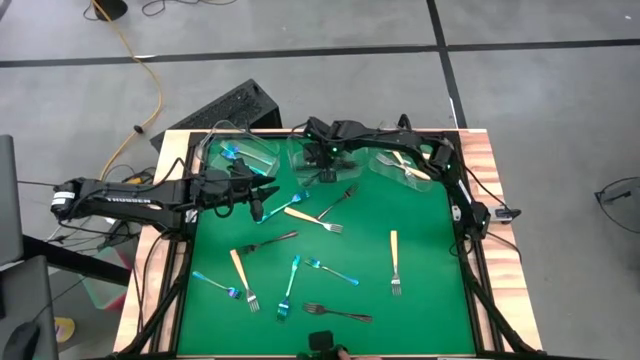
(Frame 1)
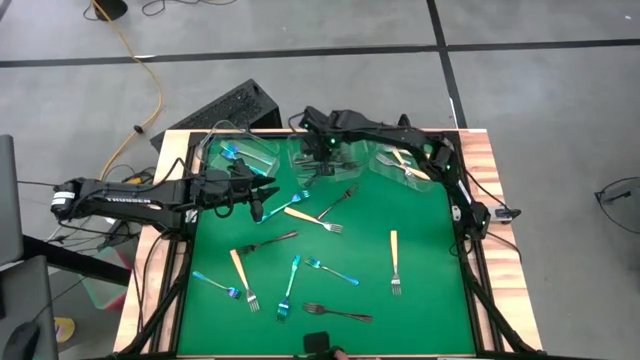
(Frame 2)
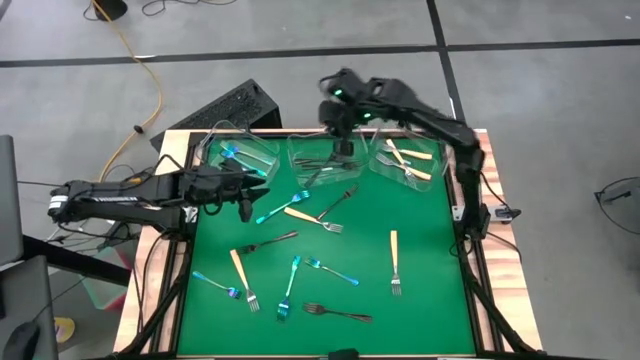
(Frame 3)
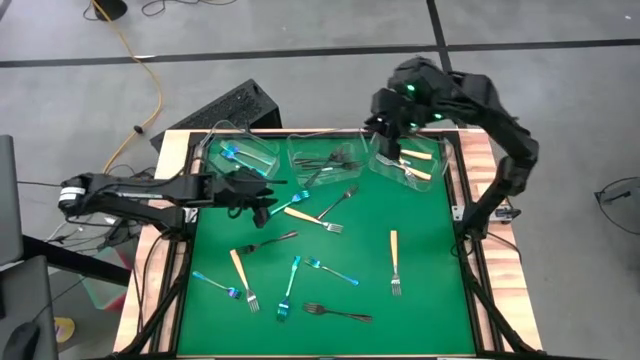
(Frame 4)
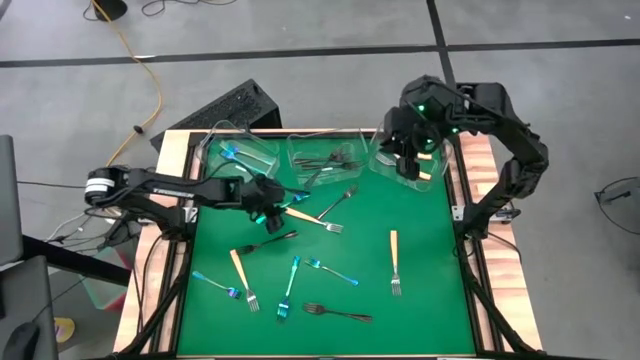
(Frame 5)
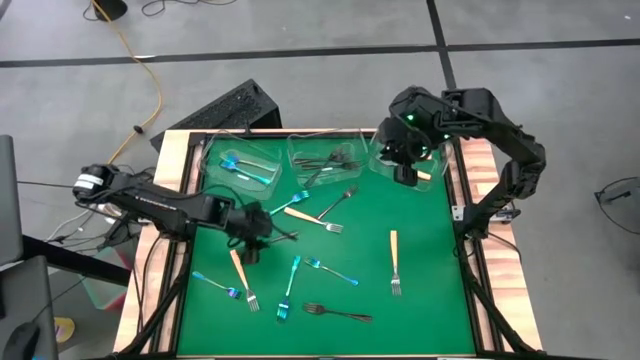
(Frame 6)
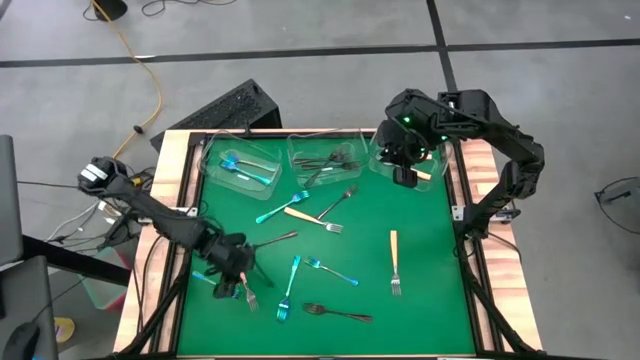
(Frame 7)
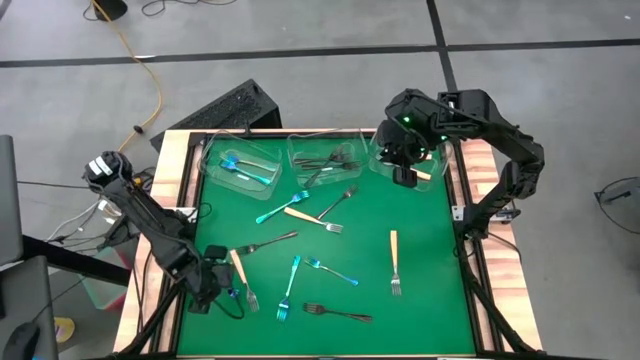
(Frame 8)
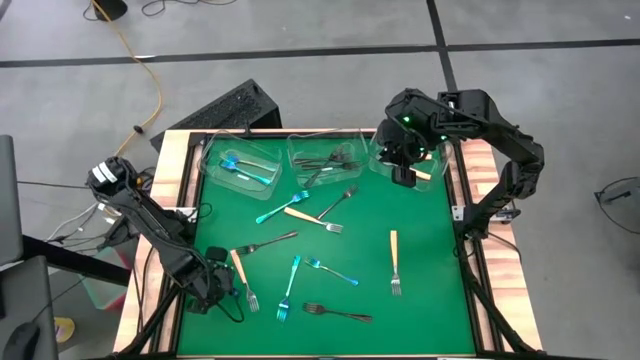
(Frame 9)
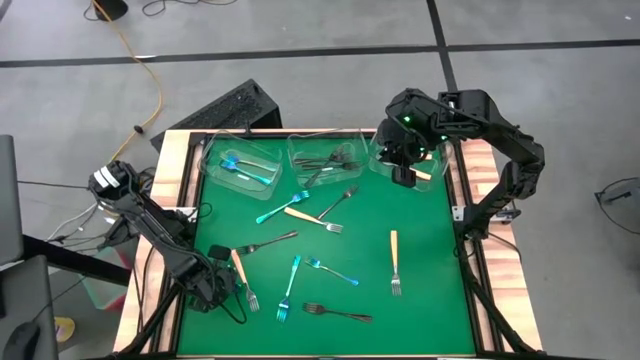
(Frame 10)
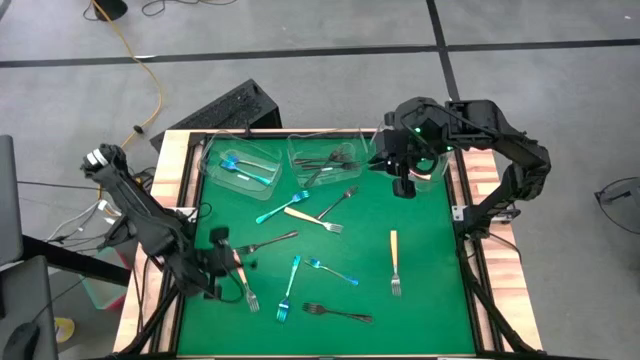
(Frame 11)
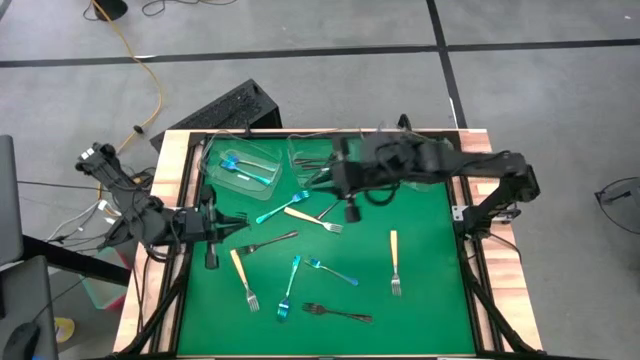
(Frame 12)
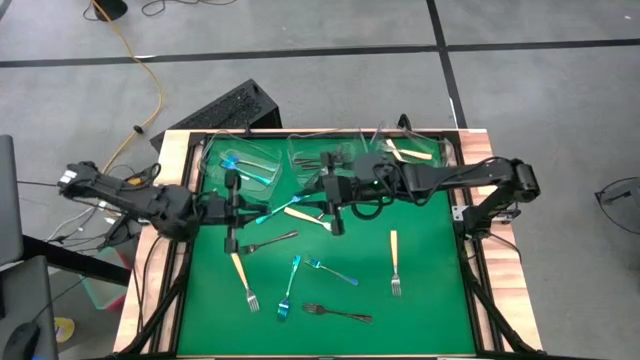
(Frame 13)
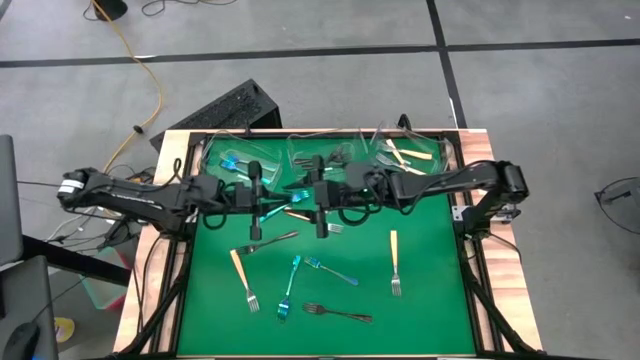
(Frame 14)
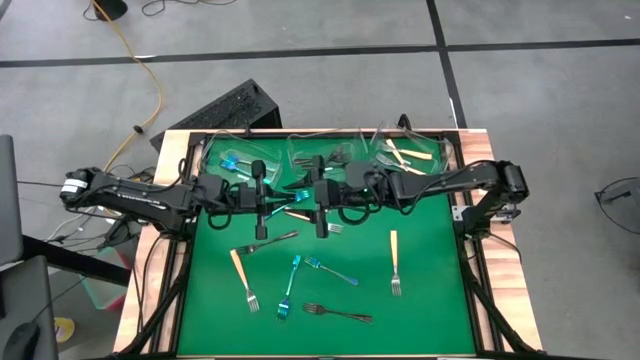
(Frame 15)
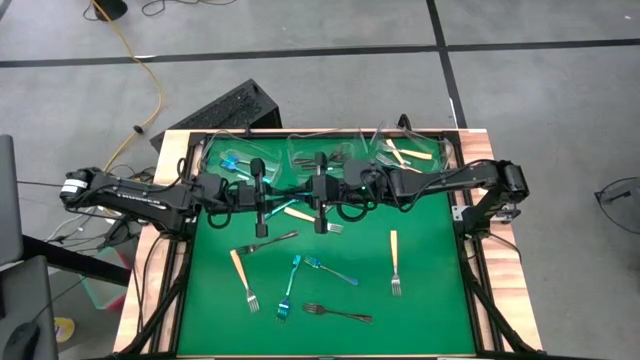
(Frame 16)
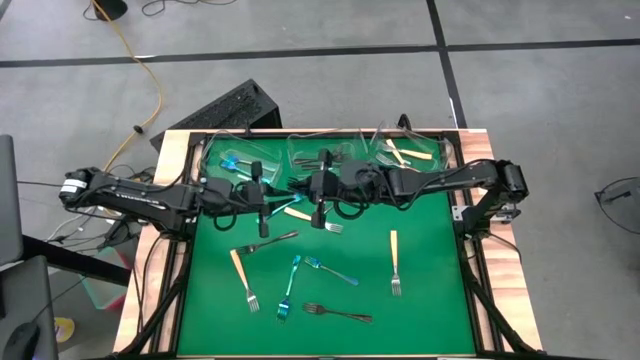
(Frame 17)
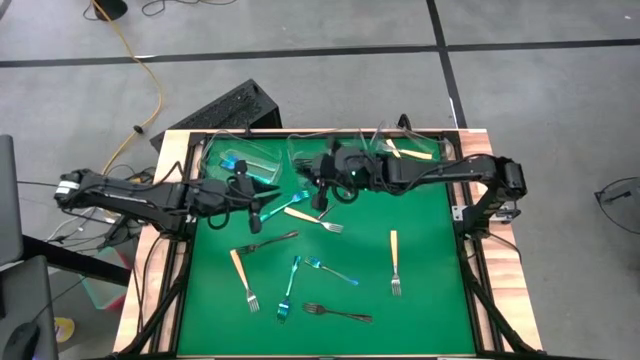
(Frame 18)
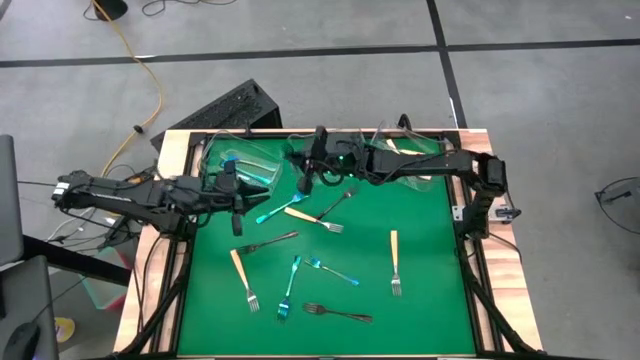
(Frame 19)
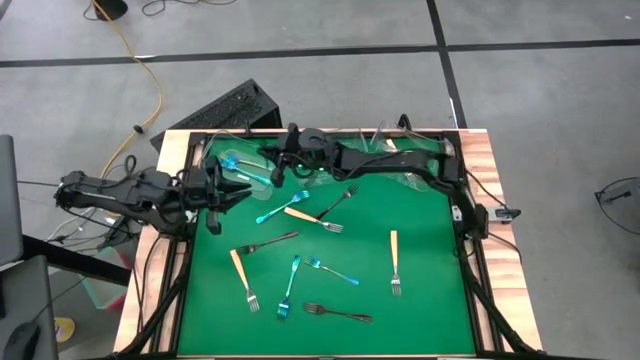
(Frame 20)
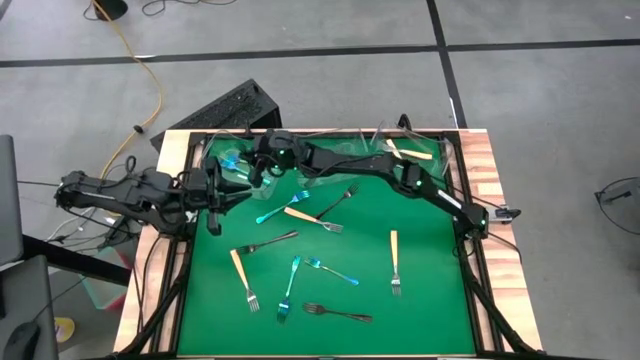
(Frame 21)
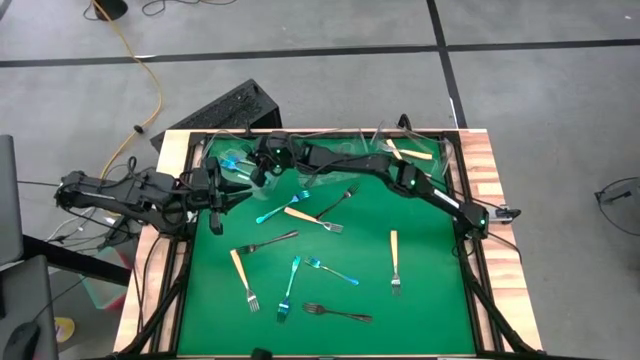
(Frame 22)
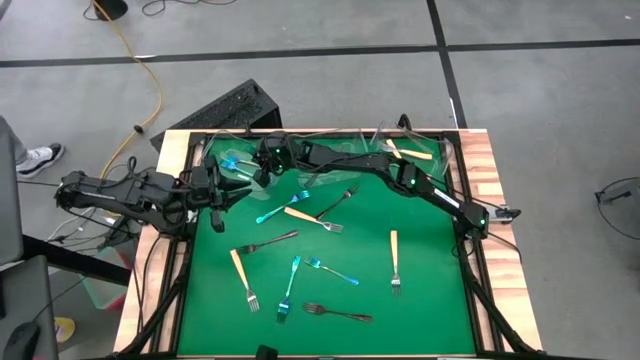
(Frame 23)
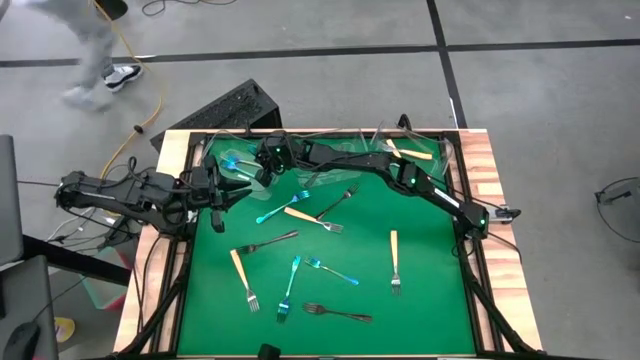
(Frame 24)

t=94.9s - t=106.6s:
Task: Sort silverware by color (type)
Put the blue fork into the left transparent bin

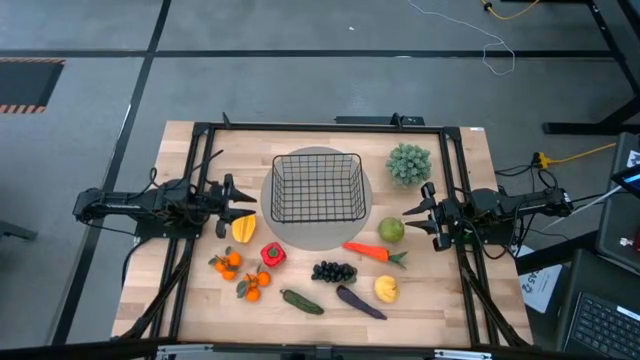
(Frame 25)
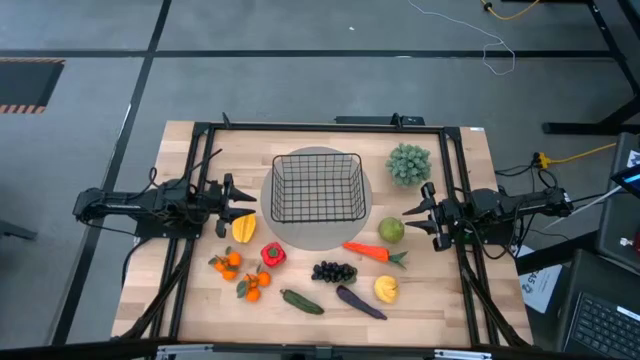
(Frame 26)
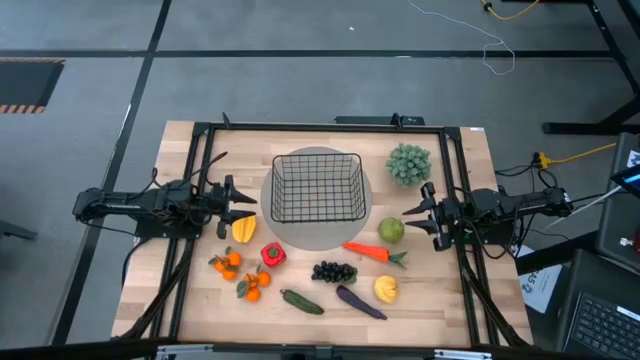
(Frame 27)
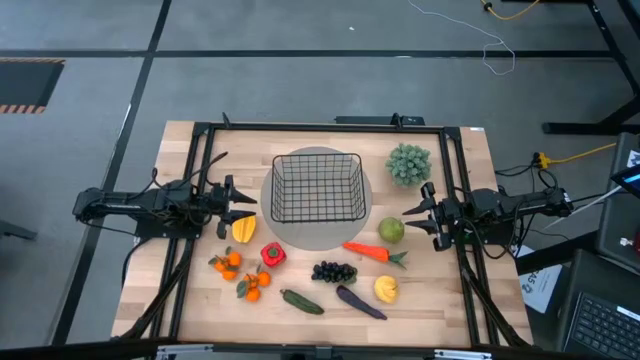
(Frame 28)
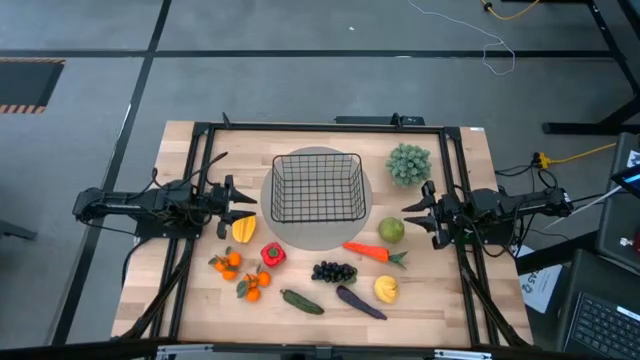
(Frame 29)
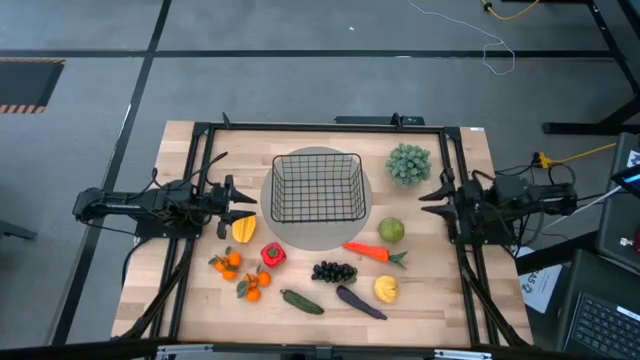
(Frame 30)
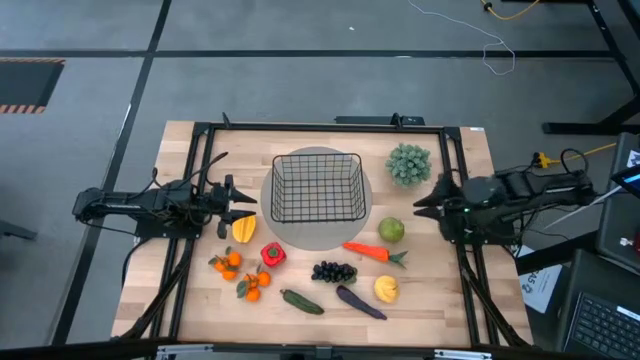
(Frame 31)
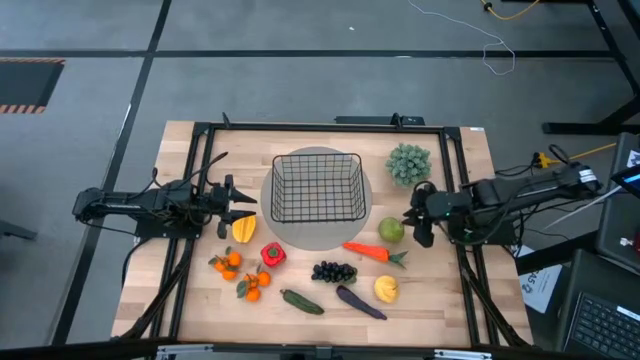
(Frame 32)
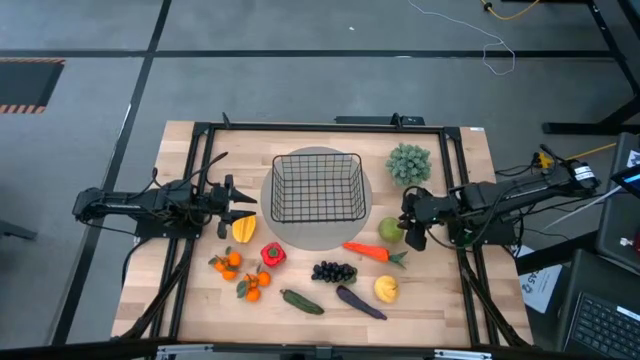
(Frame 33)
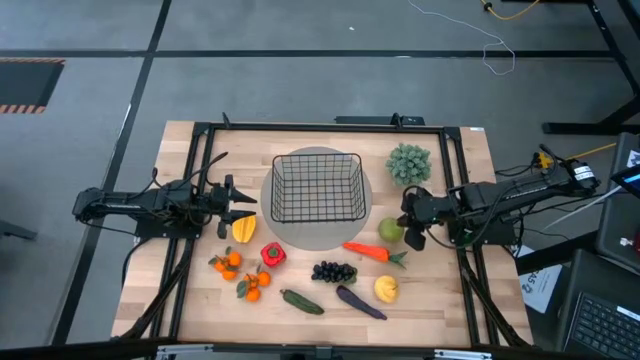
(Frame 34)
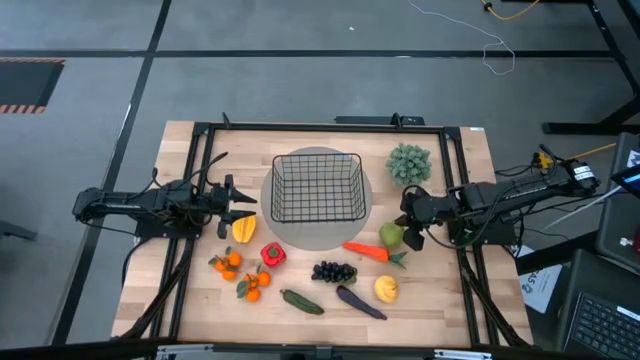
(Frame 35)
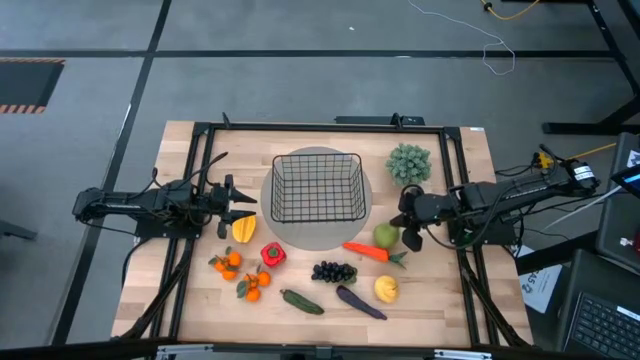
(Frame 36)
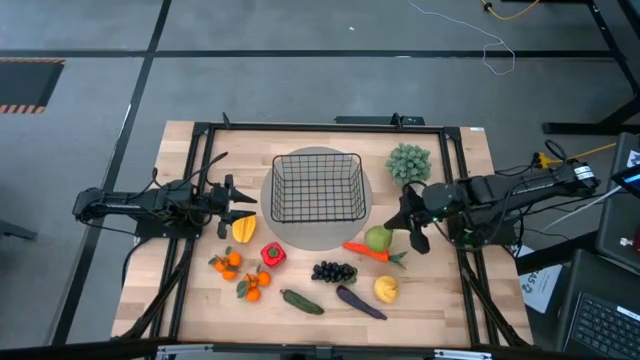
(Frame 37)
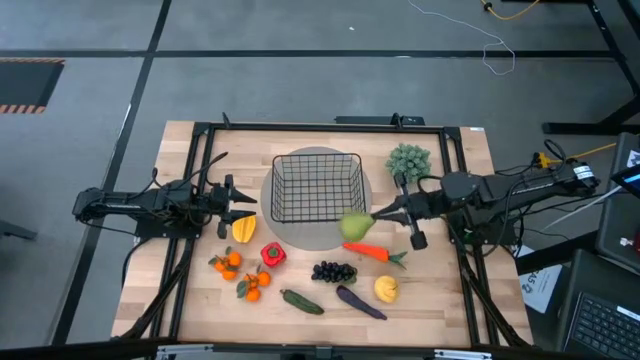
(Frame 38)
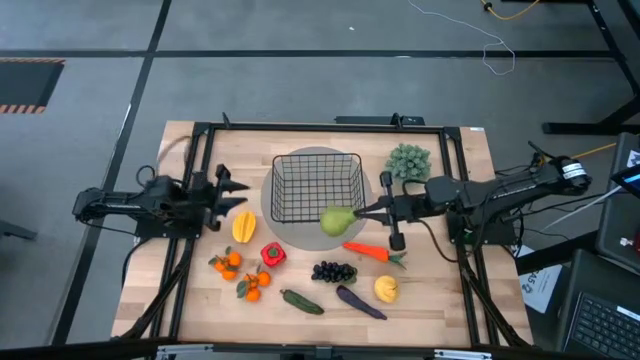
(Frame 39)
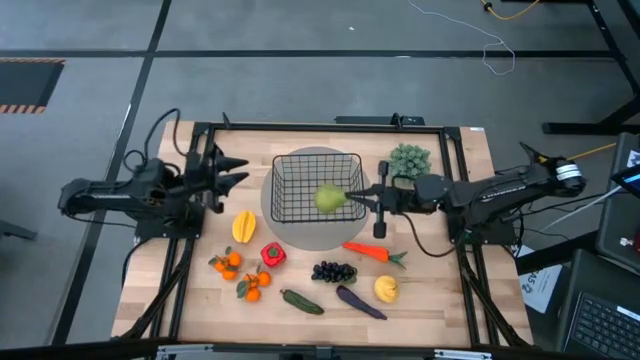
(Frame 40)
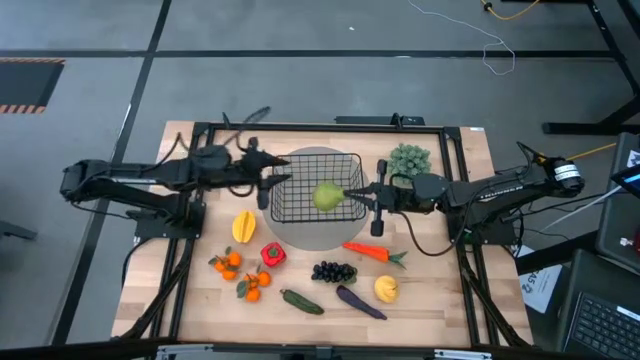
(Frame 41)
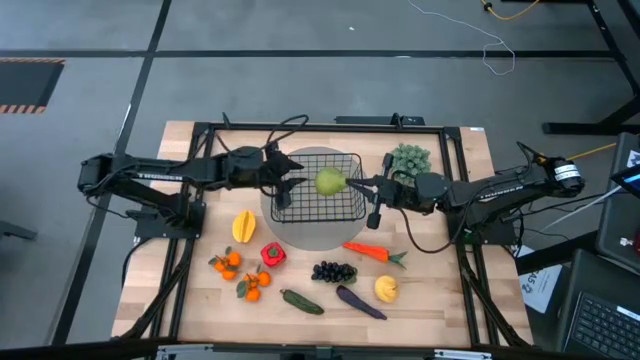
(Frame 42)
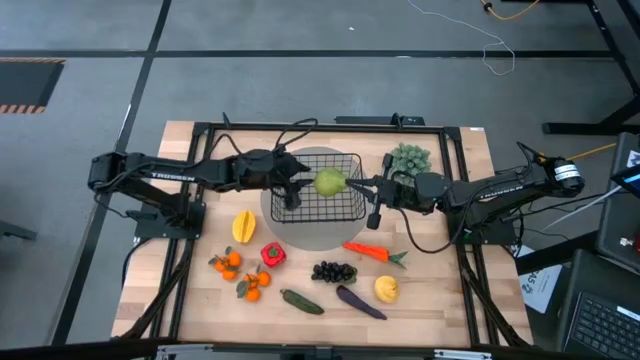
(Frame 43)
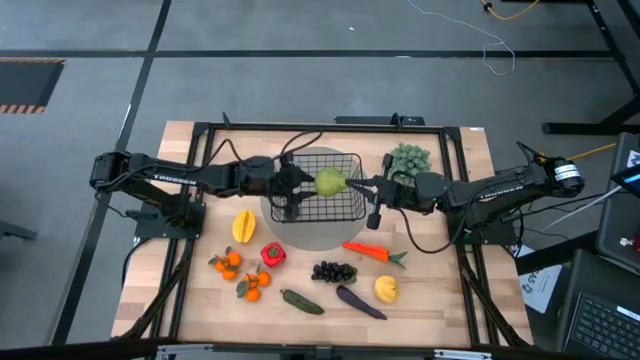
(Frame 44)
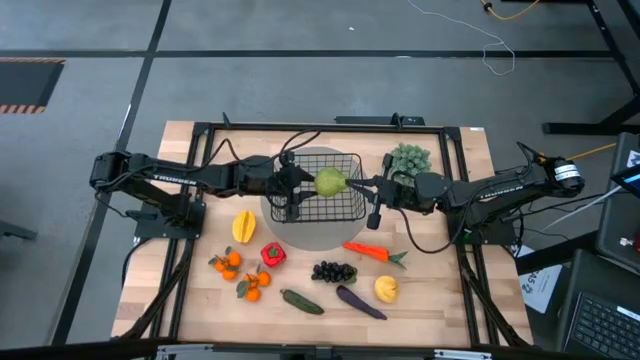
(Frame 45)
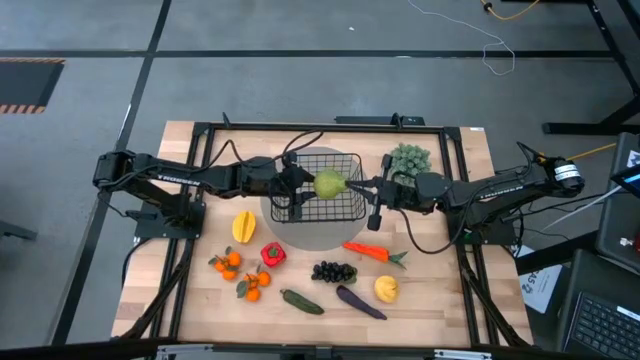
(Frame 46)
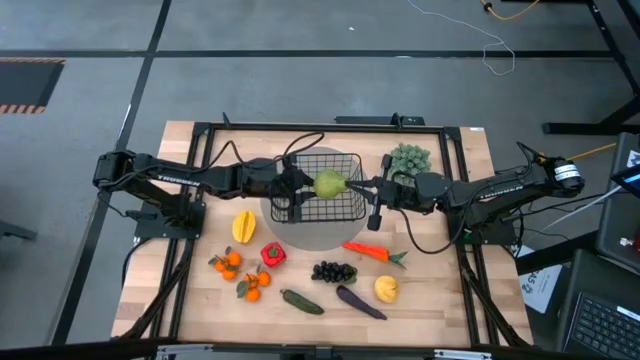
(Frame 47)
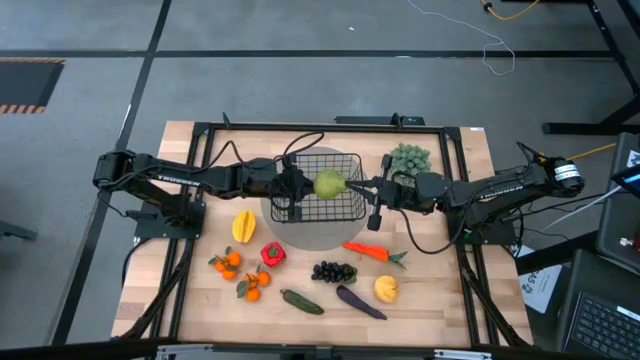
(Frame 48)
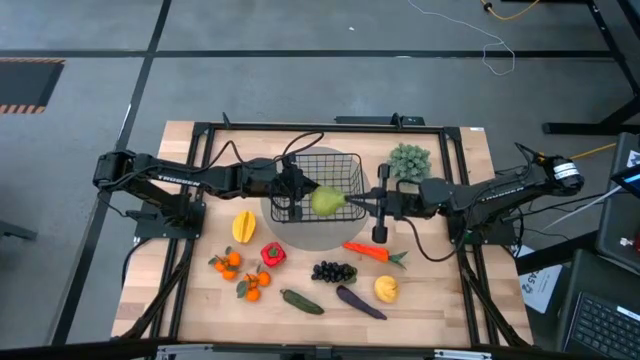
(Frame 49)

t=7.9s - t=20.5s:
Task: Build produce basket
Put the green pear into the black wire basket
